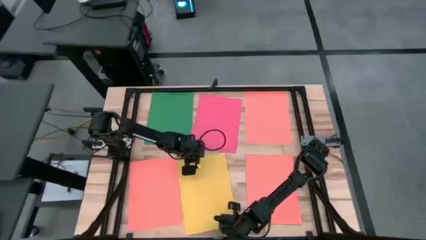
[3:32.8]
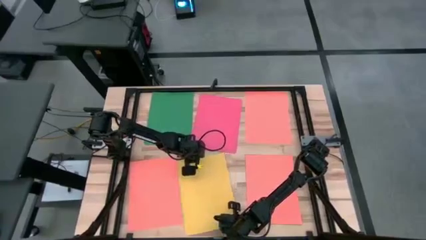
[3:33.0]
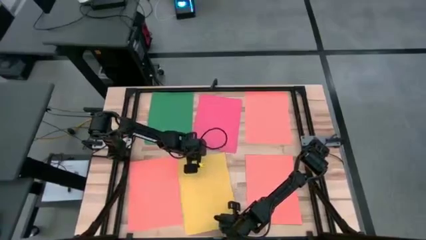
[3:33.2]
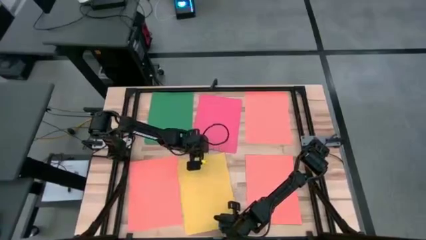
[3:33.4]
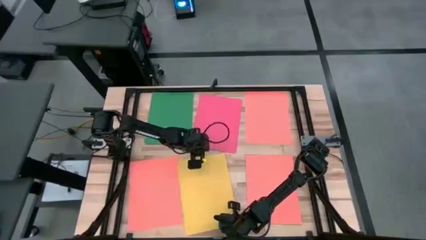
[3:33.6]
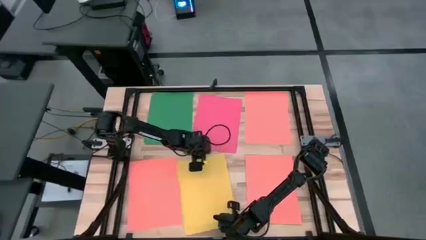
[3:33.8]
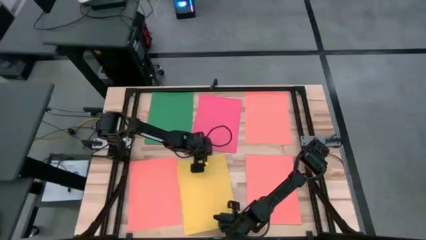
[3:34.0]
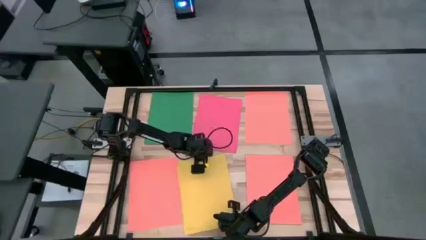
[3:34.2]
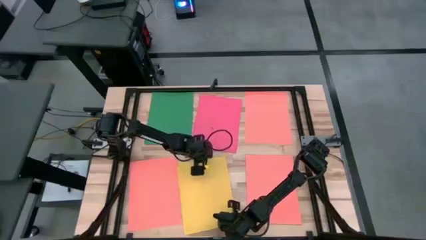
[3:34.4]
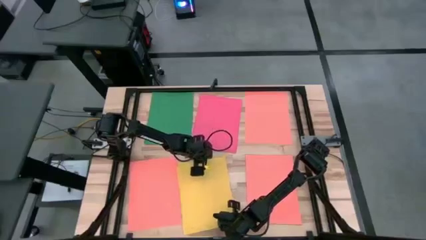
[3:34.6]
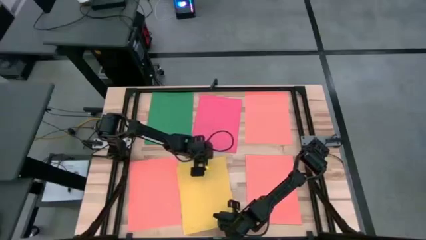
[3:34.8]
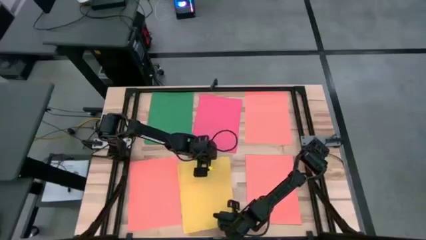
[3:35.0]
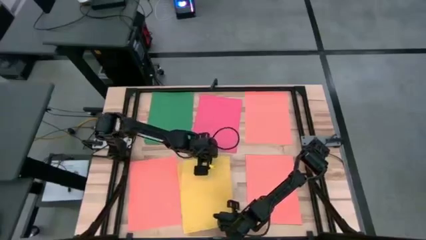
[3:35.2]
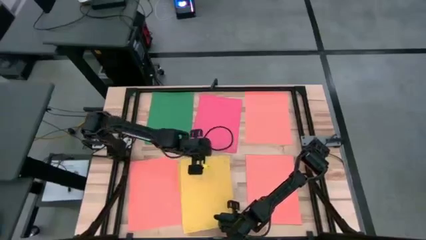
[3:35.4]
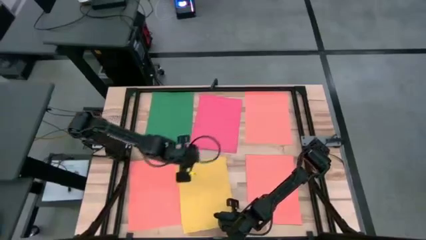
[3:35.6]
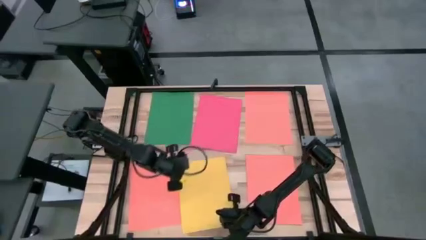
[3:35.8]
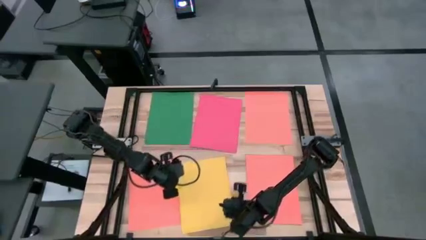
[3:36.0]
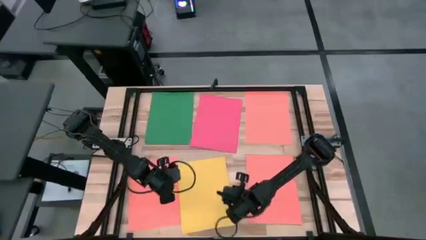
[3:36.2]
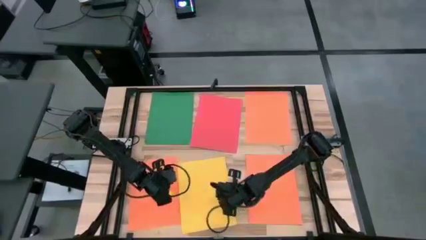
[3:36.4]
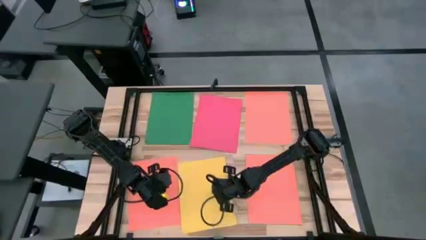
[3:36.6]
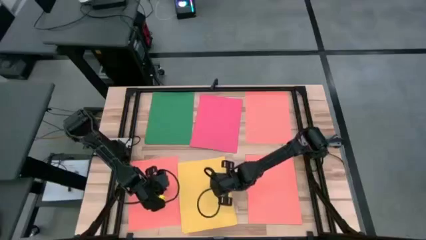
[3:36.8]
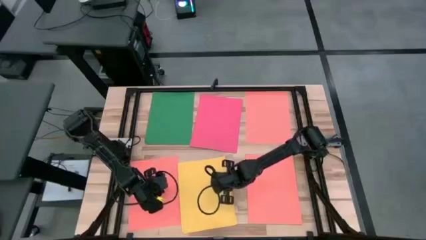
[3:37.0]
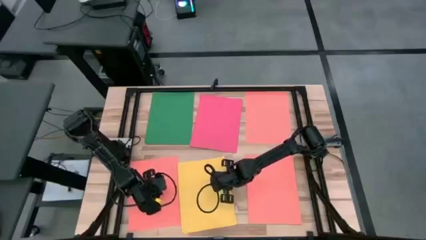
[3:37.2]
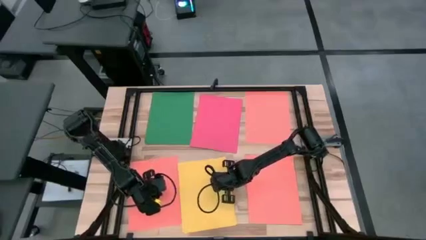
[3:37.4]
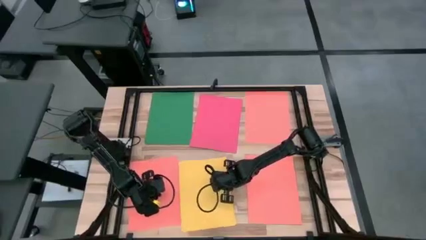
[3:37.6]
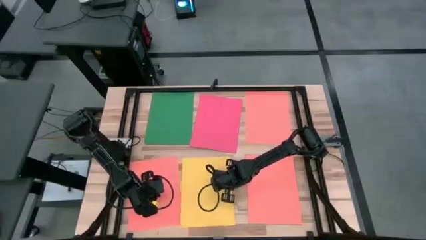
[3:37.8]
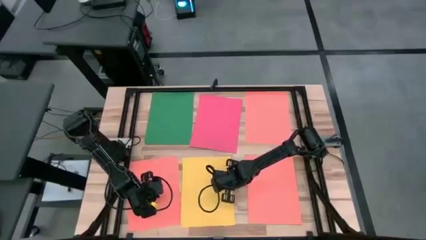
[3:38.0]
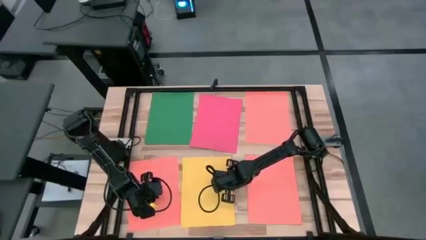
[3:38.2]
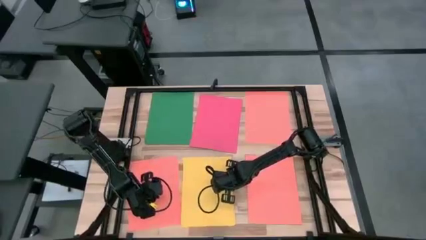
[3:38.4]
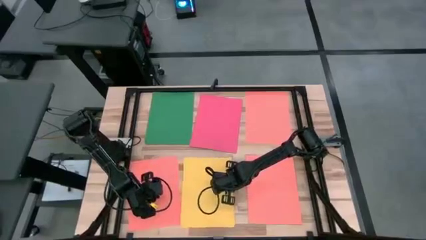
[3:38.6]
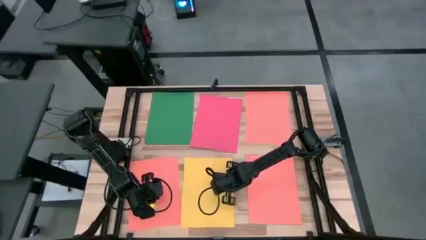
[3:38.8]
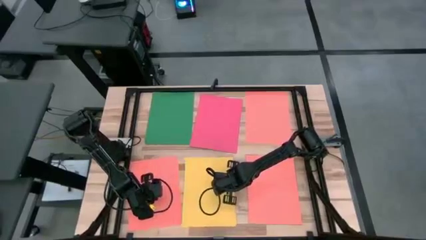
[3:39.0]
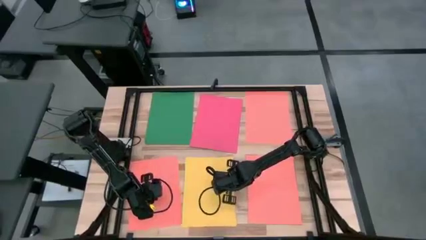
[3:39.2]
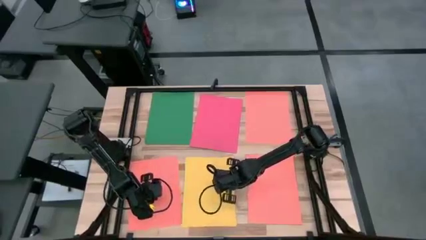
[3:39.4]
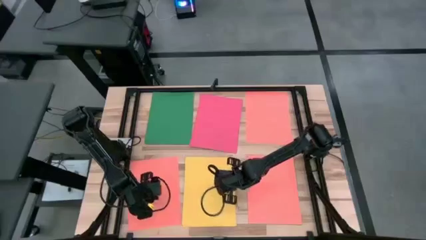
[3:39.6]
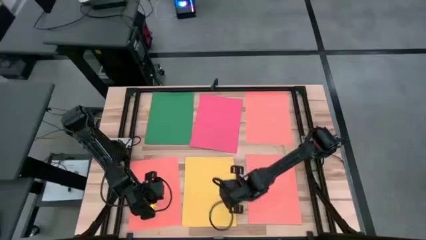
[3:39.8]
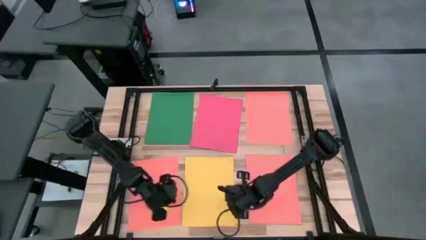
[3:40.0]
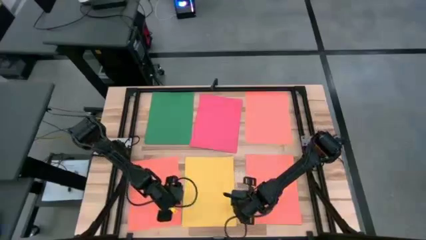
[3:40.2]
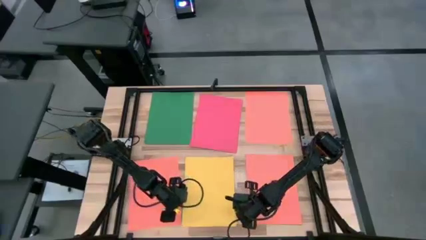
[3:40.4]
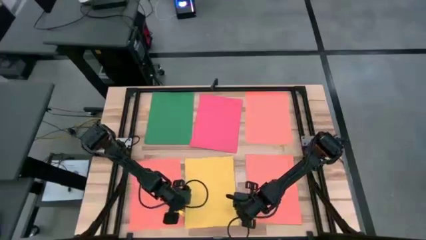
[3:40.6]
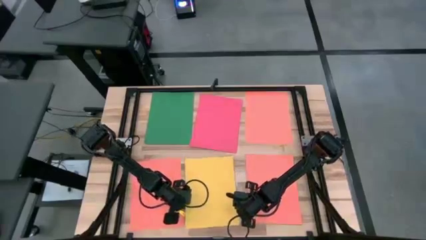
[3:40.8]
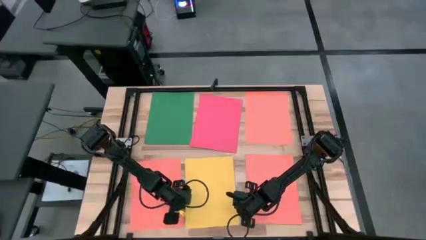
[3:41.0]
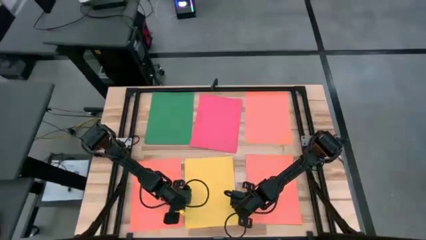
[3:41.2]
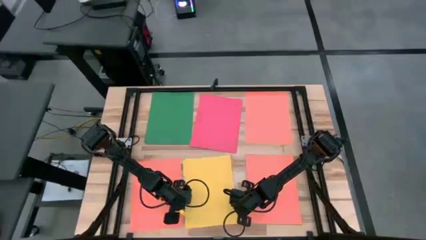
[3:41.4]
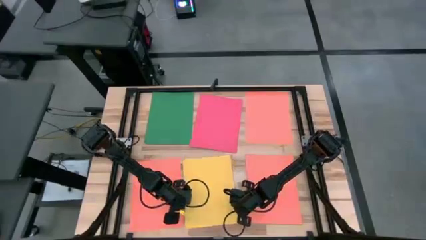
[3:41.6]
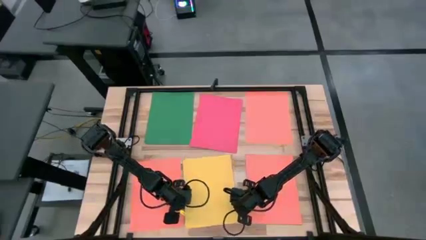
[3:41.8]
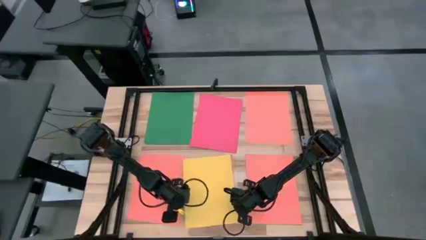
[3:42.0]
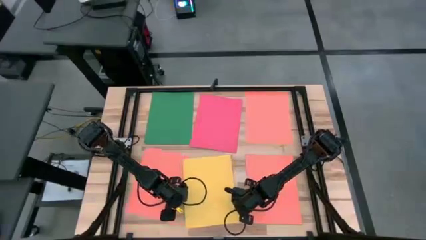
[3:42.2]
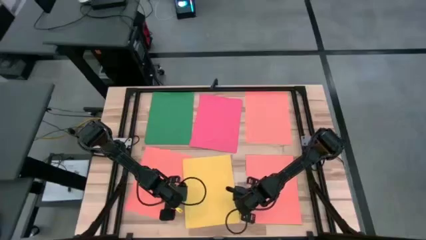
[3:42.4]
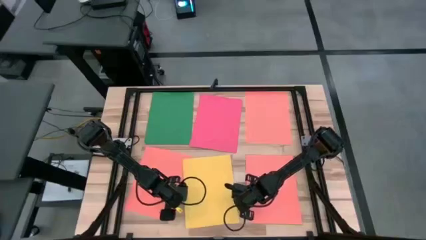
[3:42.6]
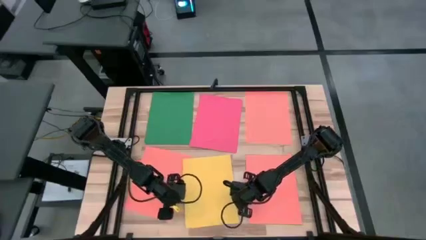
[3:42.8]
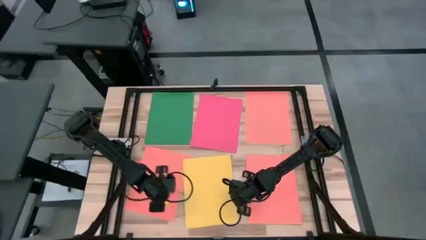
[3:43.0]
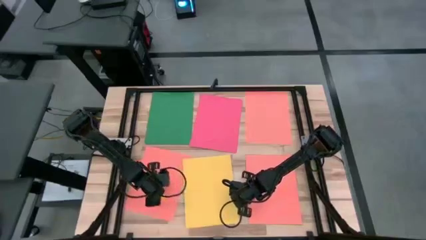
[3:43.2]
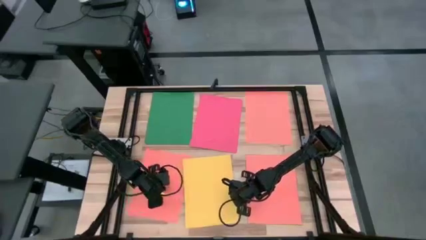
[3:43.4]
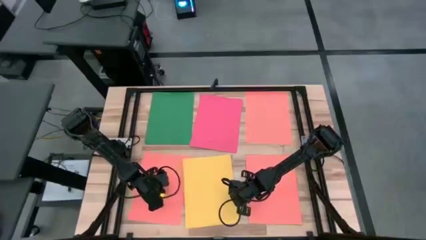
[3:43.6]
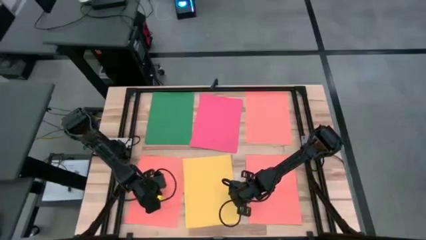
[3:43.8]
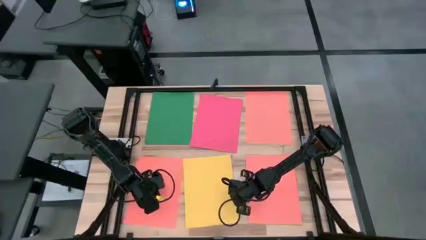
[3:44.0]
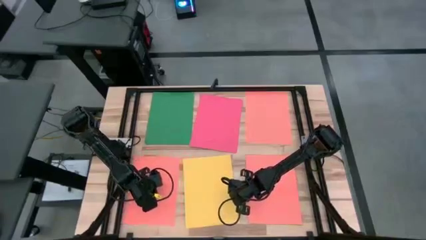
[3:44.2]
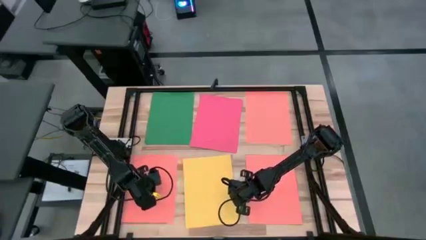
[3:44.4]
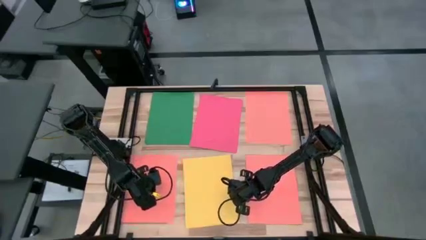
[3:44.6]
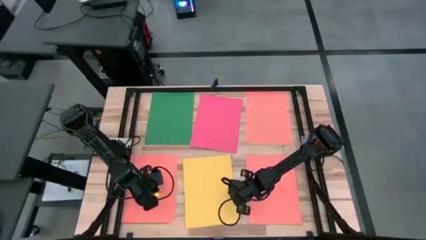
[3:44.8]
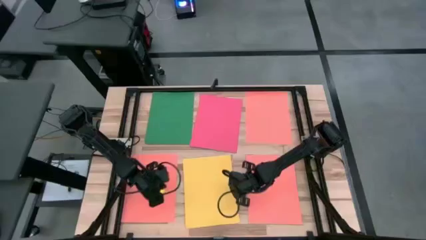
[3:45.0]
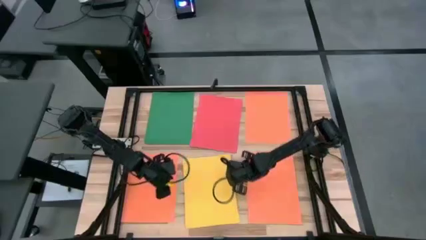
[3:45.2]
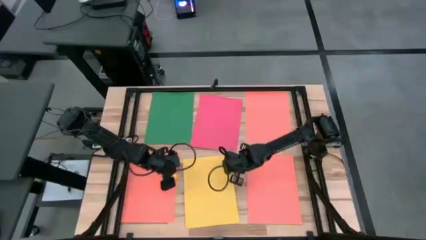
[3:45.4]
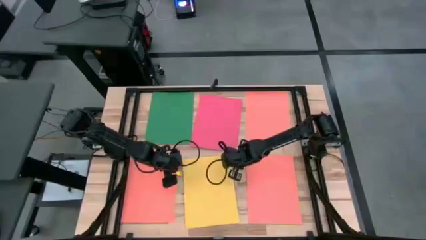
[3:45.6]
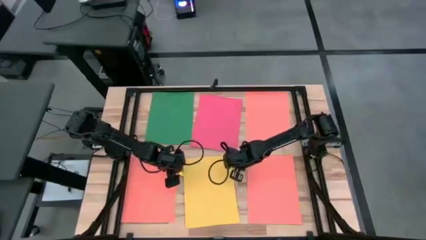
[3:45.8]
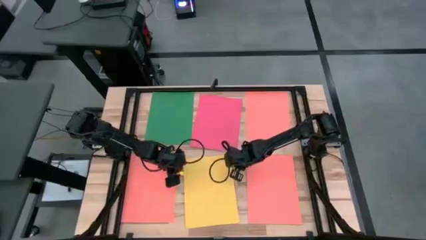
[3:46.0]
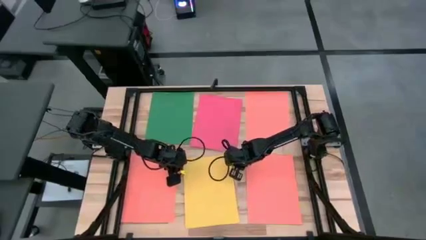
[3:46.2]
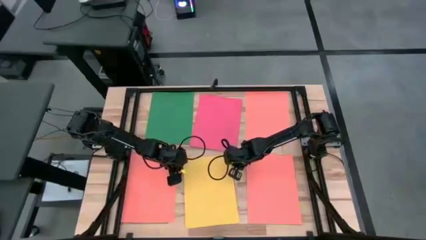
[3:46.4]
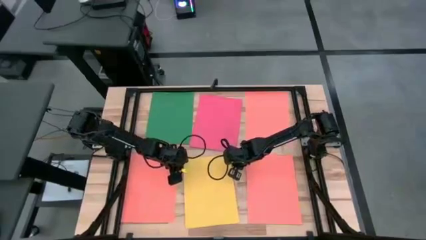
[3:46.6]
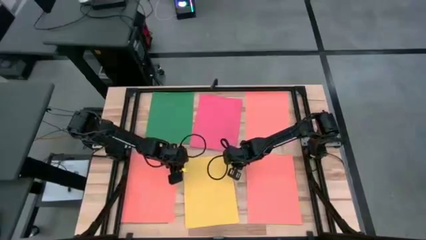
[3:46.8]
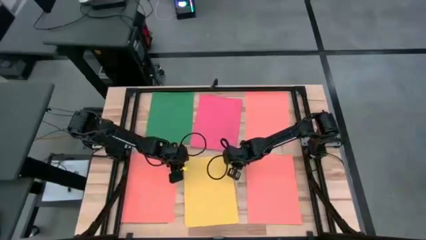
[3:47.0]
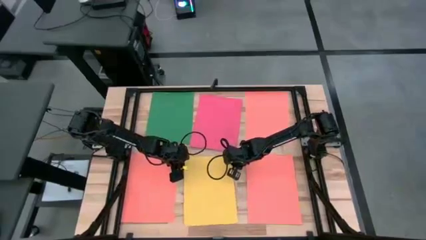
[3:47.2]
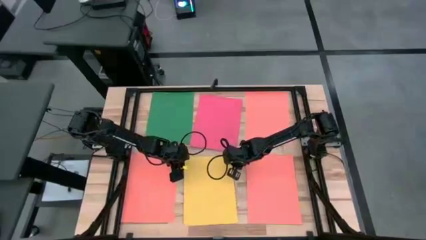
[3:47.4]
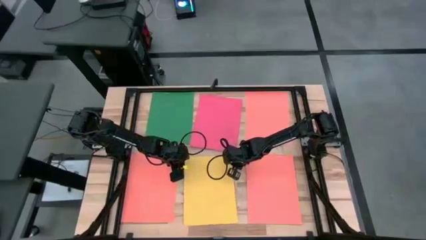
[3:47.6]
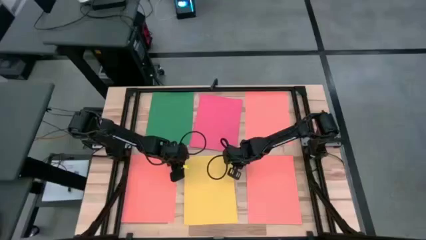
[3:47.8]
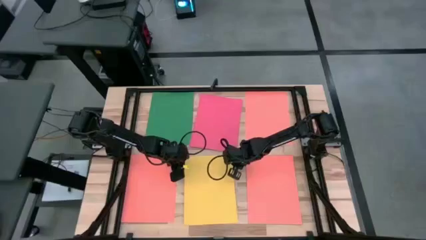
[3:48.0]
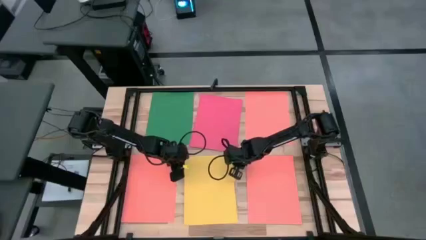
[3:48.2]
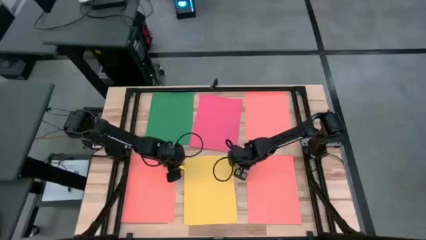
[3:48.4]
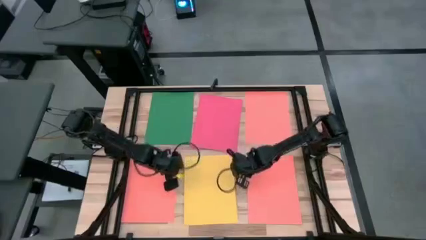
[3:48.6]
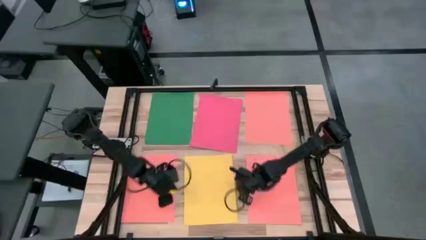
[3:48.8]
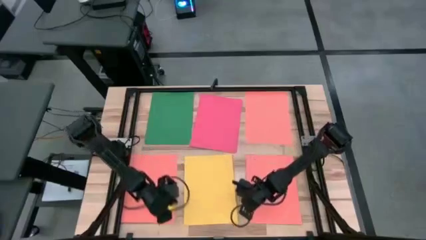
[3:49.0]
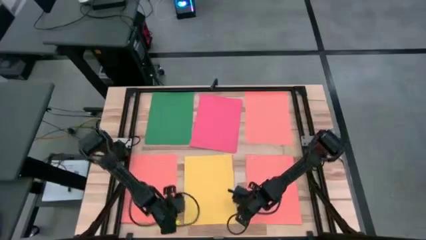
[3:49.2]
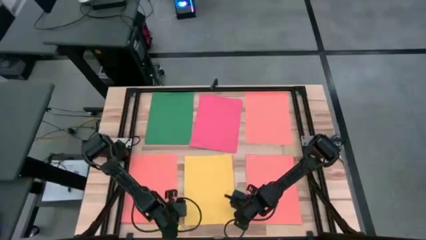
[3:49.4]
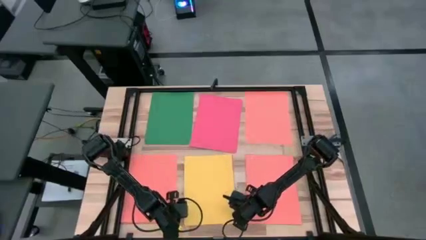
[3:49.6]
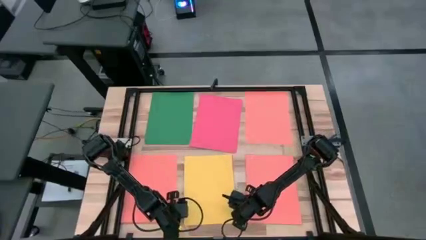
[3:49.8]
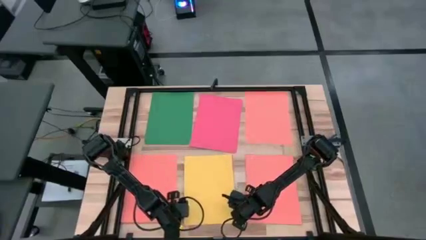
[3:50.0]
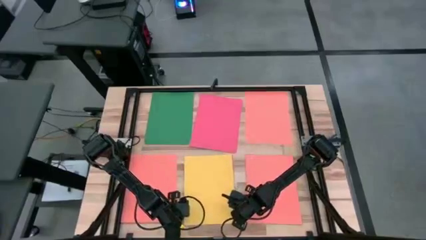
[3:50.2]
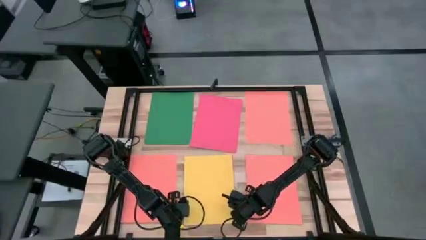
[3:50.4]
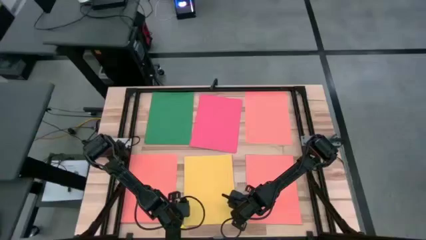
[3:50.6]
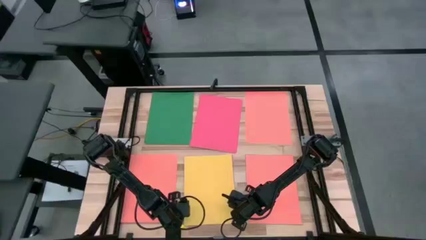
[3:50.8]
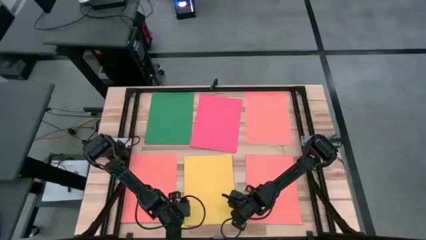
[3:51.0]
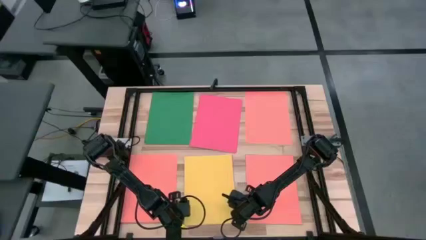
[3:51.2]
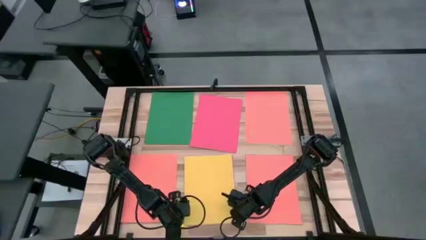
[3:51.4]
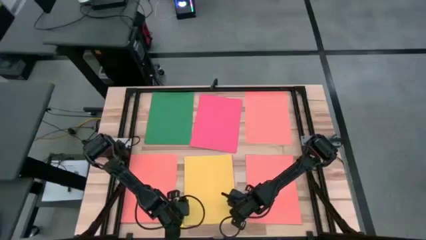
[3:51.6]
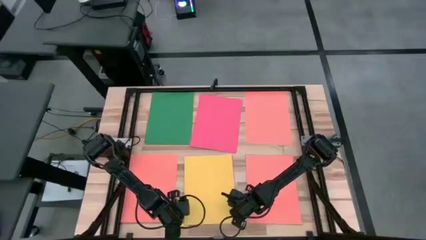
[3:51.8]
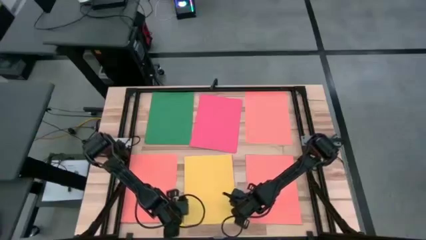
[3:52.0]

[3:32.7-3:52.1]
Task: Organize paper
Stack the yellow paper on top of the yellow paper
